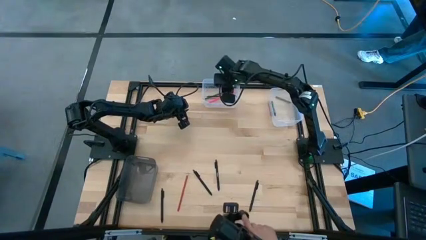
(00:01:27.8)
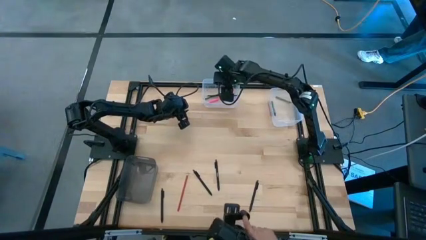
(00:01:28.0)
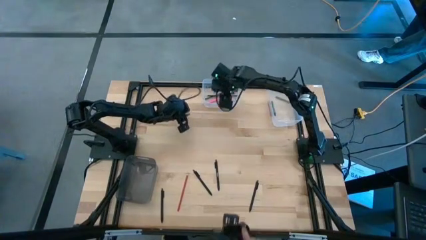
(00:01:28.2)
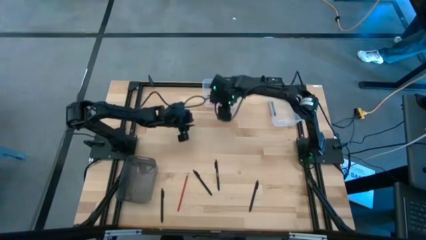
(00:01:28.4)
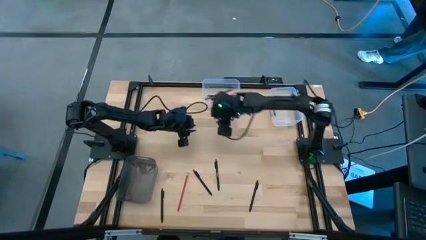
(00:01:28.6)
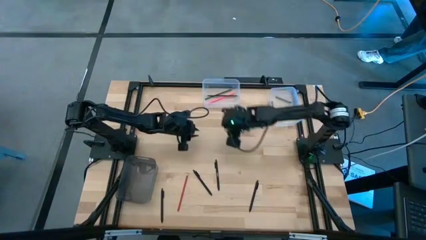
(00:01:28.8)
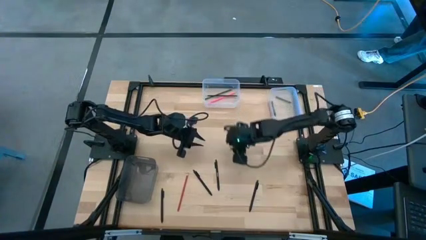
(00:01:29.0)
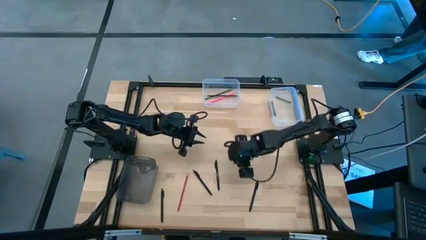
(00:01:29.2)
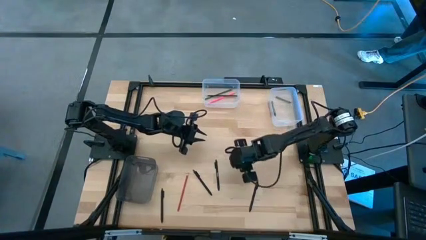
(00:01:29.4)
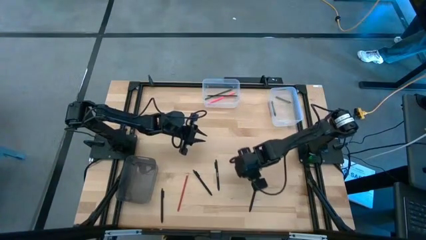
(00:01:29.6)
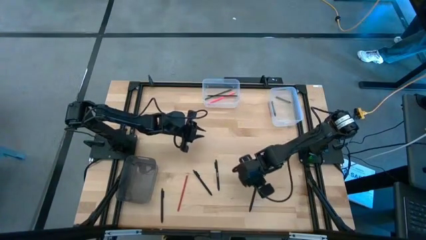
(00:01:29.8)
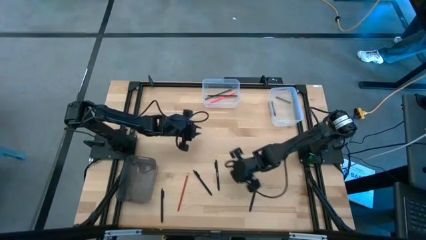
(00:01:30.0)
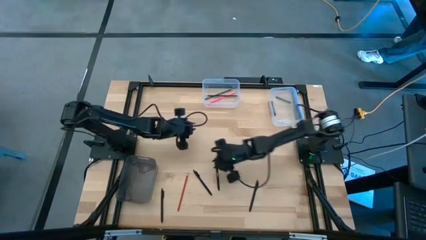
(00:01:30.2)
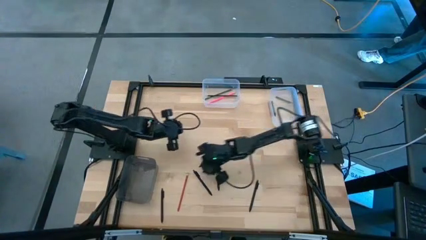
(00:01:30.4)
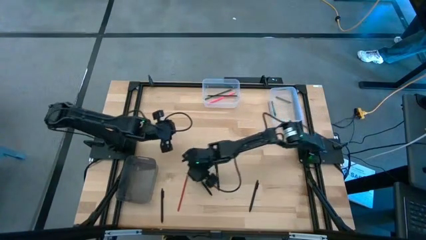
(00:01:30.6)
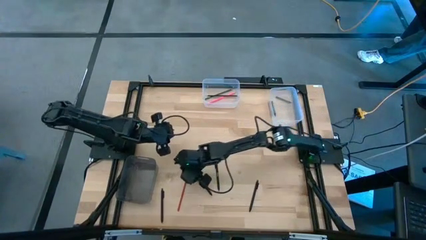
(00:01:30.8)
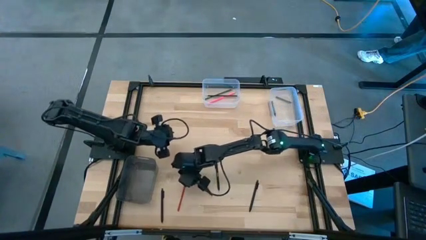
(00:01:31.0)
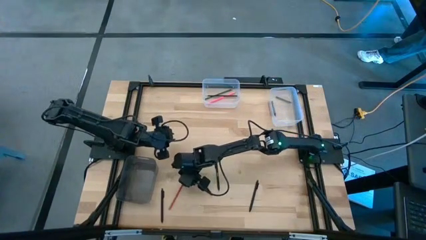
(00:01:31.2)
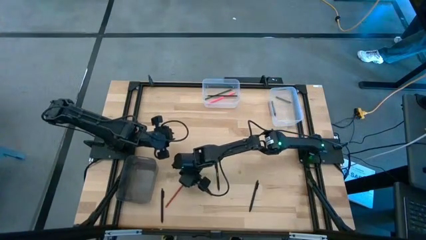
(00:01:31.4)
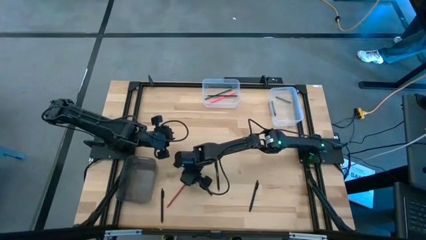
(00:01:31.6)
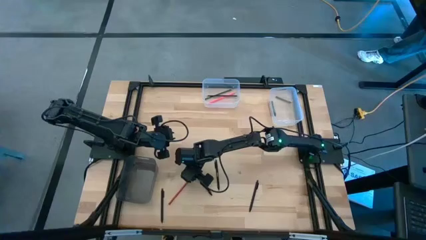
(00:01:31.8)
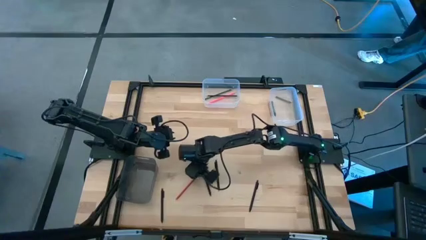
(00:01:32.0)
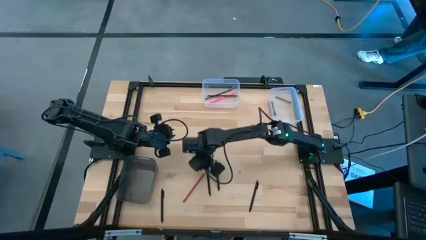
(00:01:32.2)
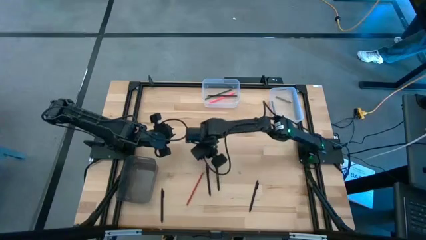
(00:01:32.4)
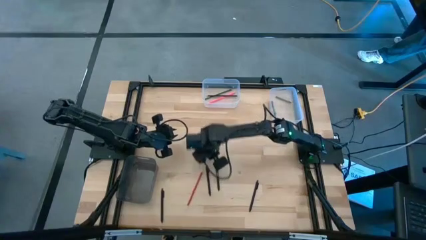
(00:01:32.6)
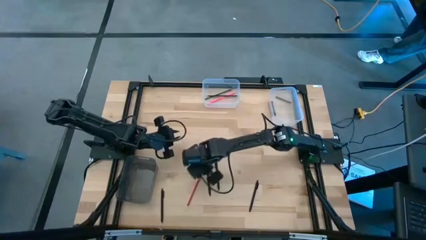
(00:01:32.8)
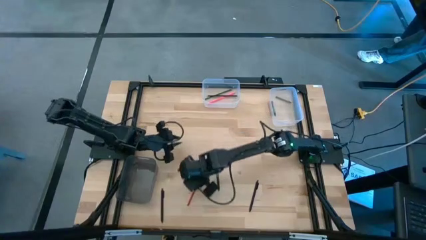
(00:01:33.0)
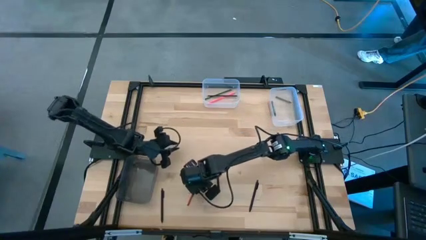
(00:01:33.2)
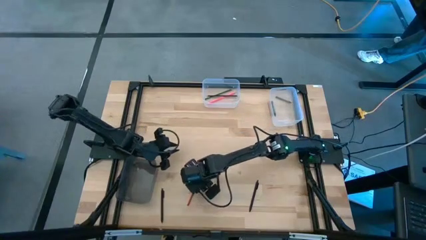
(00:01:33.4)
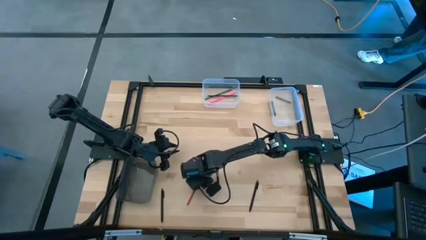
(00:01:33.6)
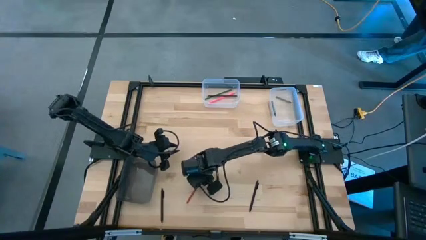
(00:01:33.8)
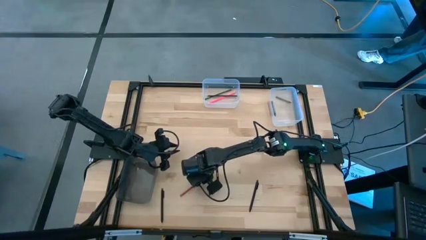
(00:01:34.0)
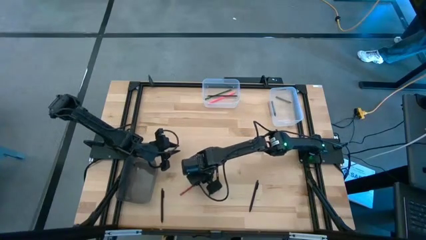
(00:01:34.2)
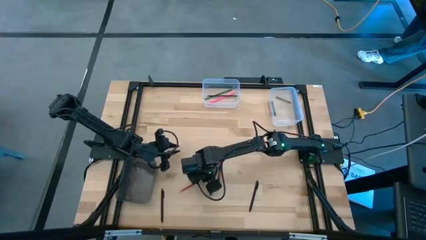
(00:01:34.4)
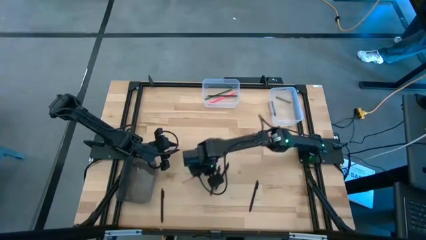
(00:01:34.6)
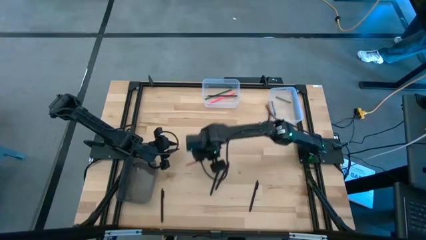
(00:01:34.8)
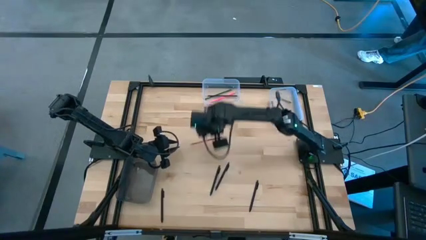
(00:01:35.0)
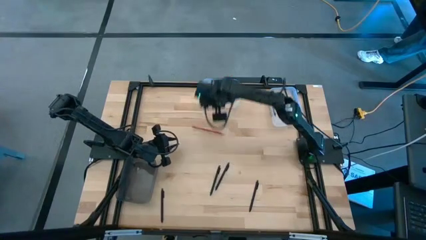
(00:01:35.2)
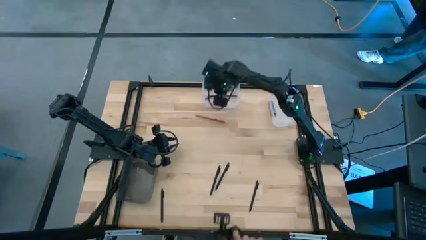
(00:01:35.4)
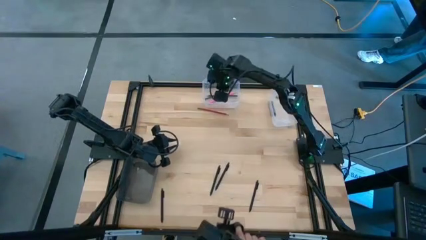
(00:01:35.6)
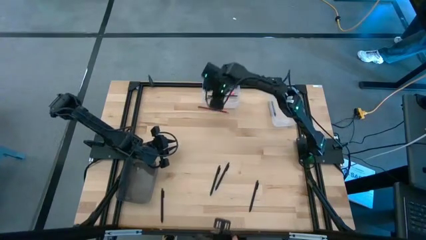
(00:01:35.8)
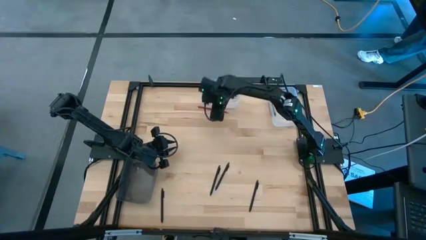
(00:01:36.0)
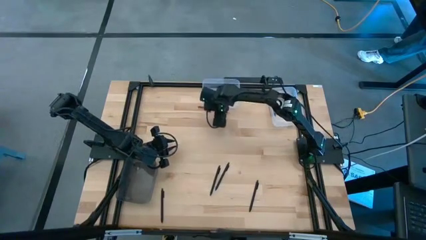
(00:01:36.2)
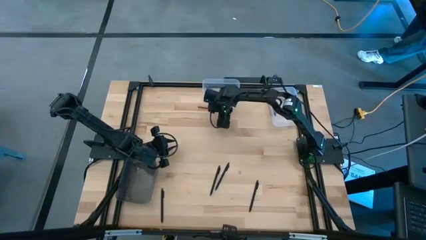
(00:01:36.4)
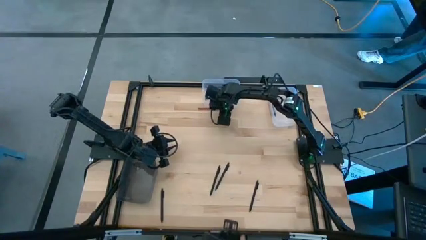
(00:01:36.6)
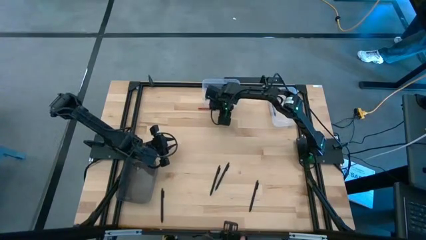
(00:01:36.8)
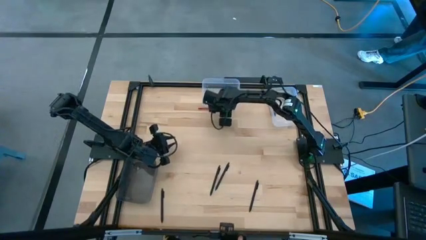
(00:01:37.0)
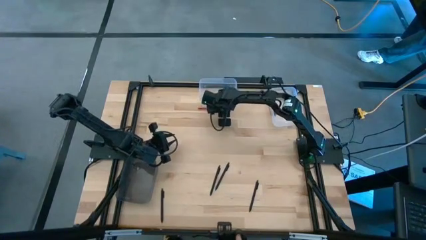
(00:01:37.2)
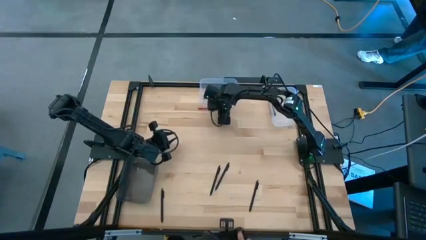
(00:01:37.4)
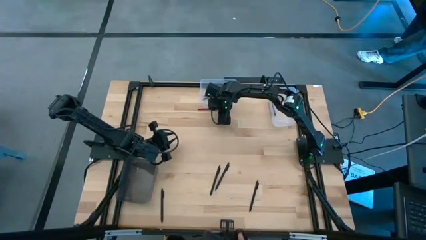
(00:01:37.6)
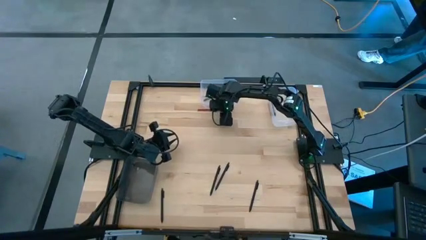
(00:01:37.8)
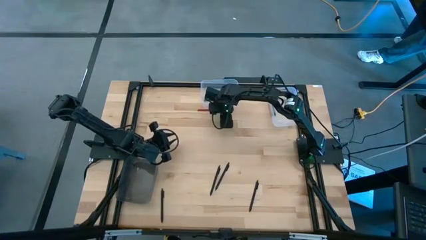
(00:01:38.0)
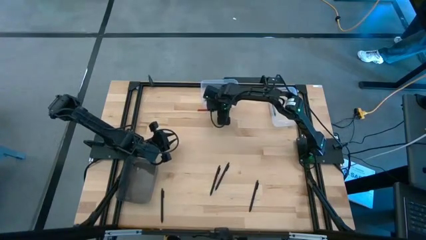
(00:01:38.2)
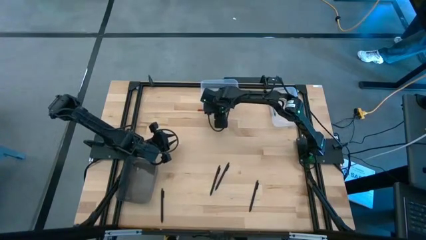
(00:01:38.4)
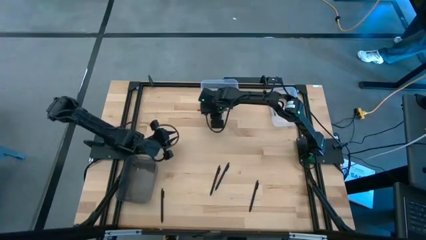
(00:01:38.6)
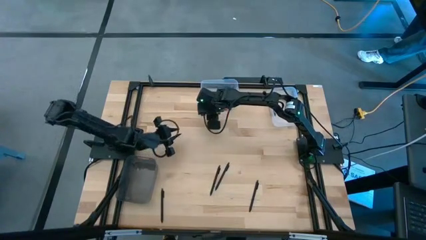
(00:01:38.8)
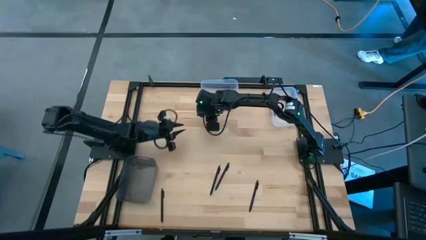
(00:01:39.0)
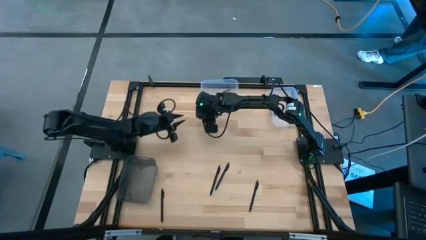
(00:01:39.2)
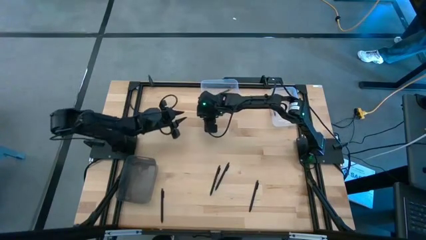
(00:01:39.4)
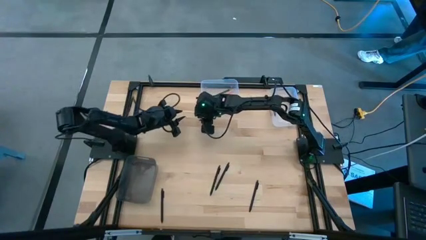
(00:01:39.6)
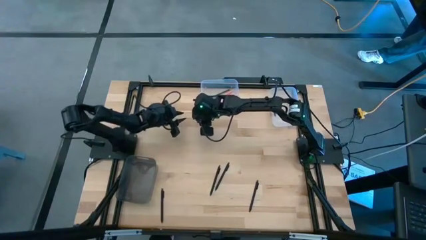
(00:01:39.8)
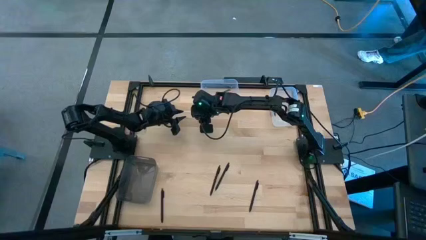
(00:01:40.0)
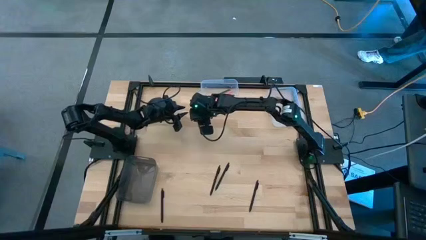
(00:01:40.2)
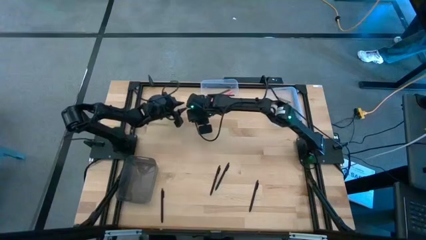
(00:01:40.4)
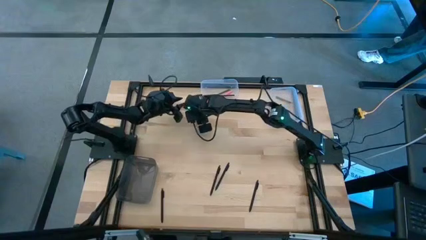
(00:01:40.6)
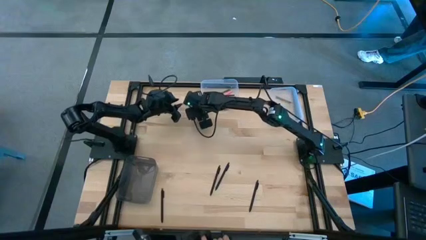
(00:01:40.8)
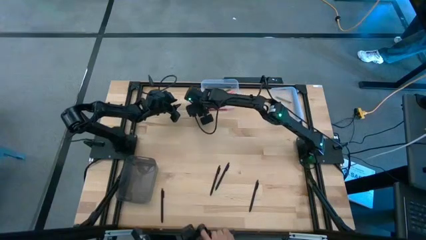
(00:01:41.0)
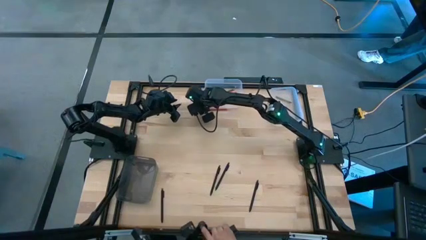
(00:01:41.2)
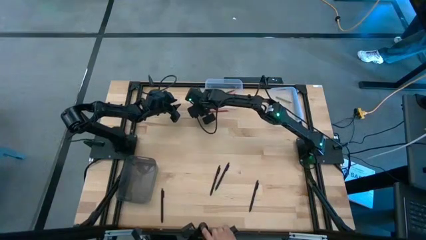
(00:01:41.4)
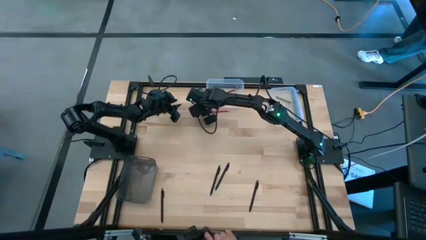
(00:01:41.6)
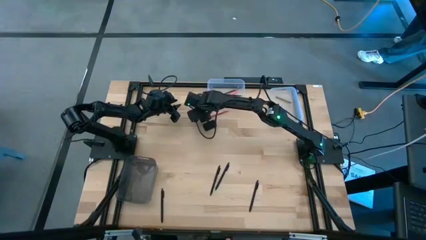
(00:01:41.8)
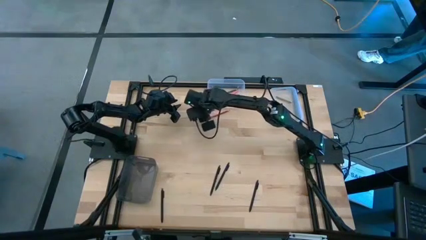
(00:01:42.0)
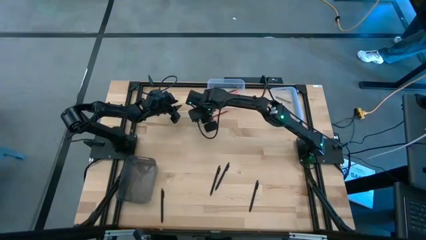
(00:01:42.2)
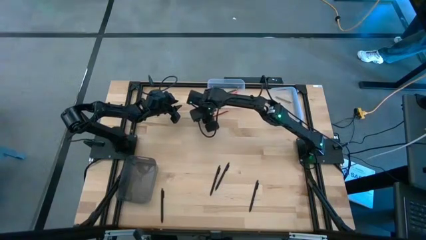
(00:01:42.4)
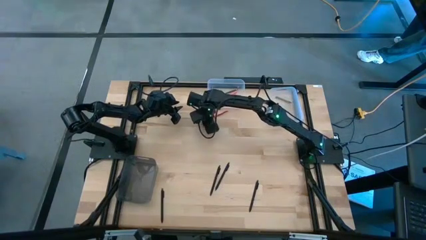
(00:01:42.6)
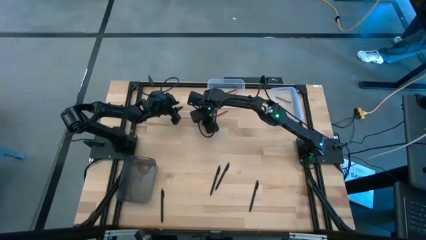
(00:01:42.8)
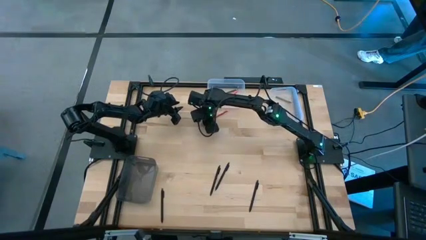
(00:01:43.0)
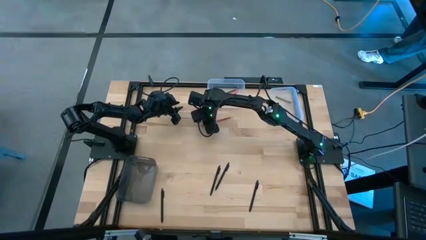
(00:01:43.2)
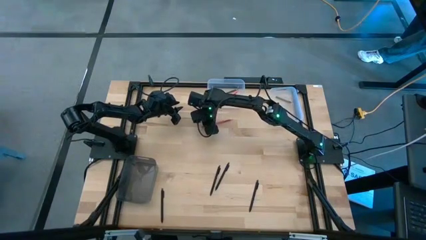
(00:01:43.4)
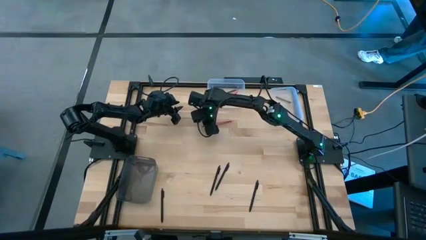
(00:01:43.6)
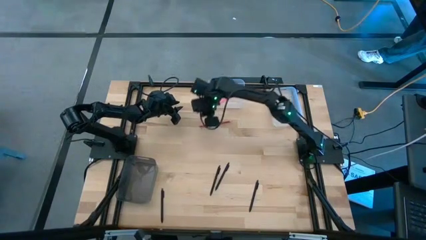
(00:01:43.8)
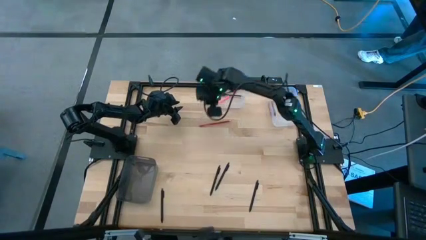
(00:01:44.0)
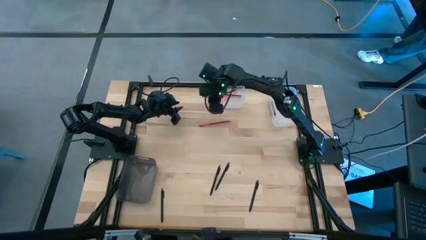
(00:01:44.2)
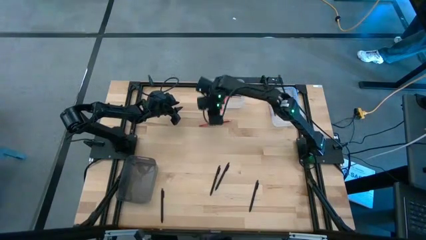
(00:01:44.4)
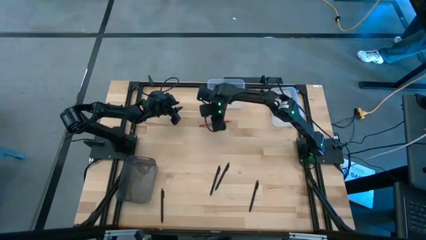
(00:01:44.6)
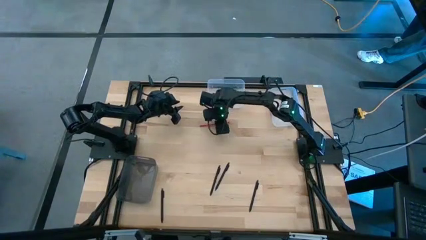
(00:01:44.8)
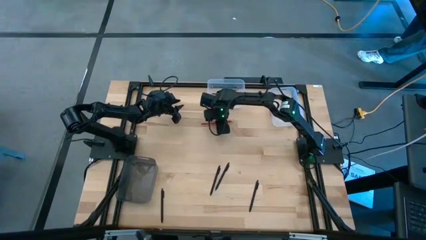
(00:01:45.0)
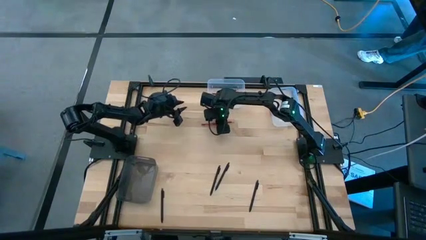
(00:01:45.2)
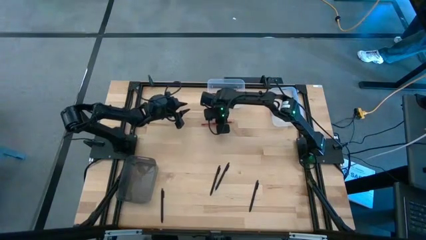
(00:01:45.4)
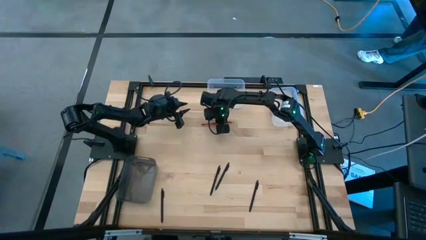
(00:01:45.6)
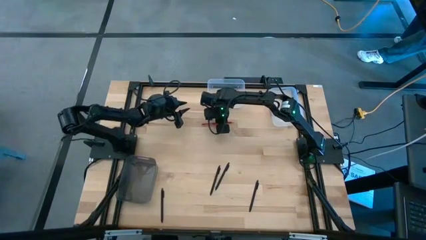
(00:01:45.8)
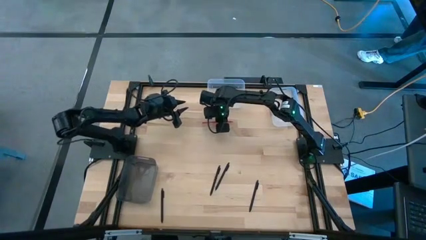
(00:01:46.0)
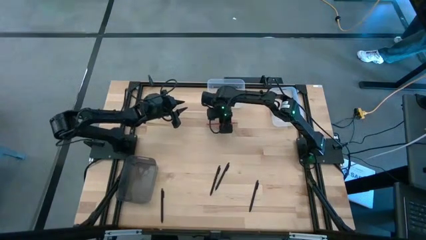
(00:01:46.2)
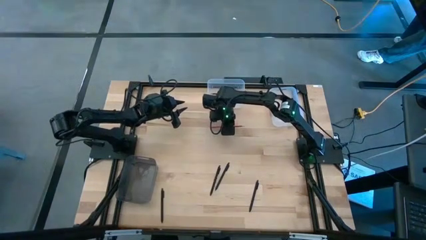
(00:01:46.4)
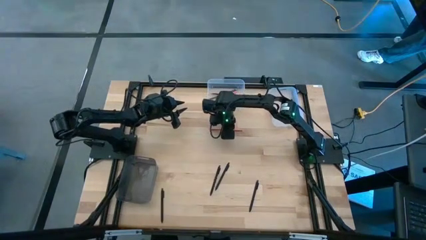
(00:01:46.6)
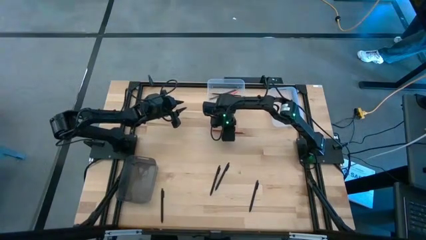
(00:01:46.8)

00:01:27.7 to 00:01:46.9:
Task: Sort crayons/erasers/pens/pencils in bins
Put the red pencil into the left transparent bin
